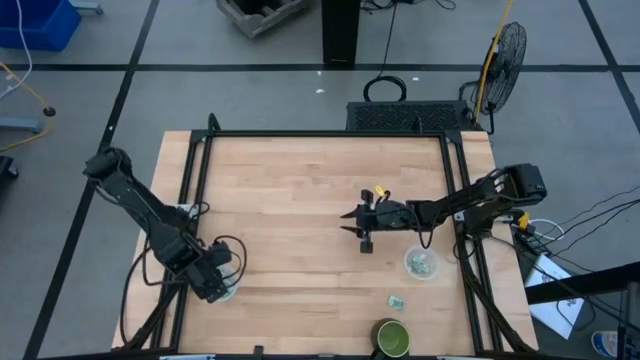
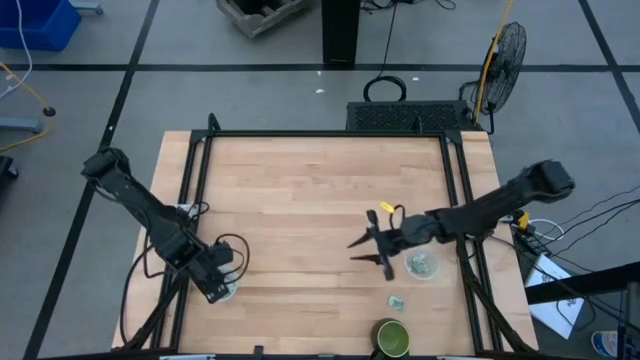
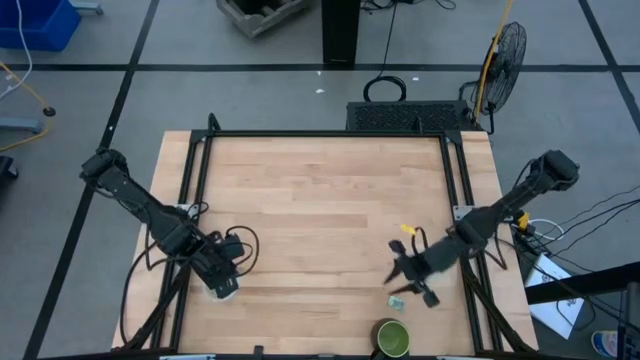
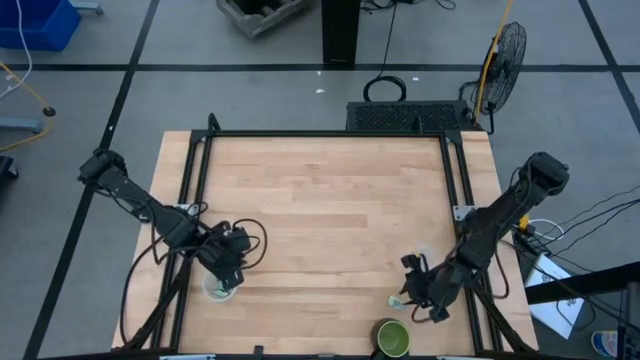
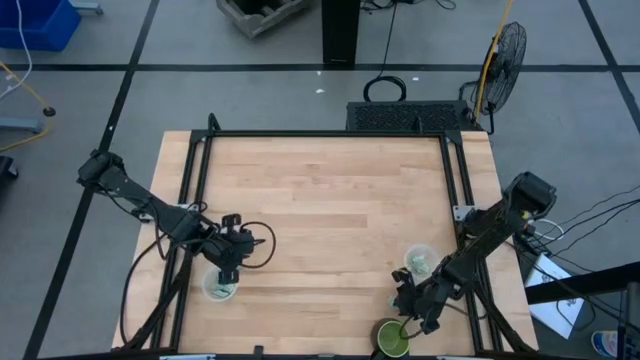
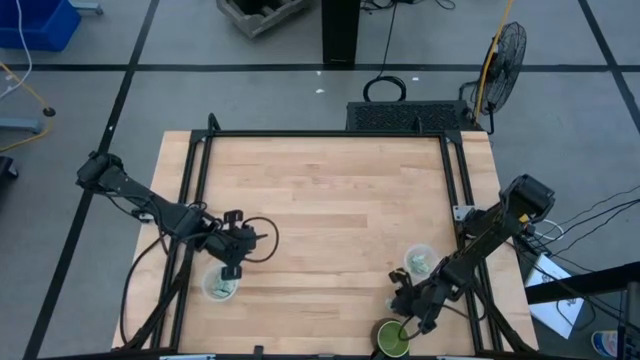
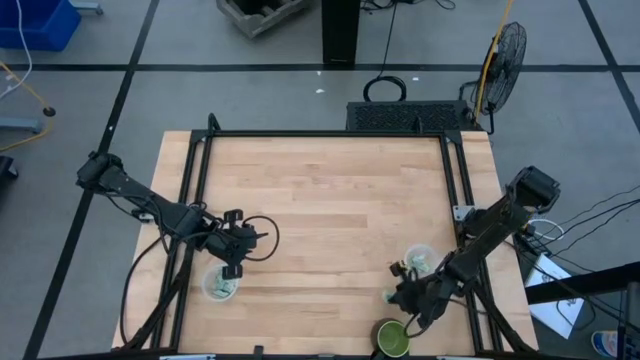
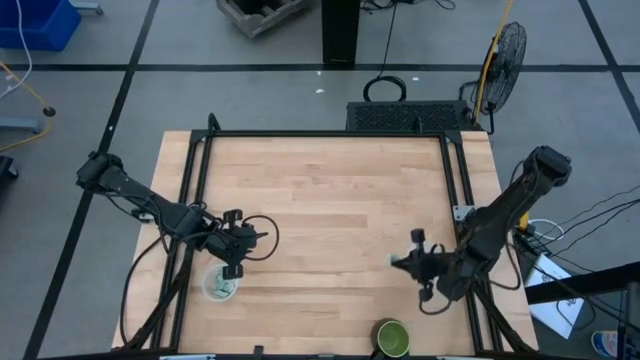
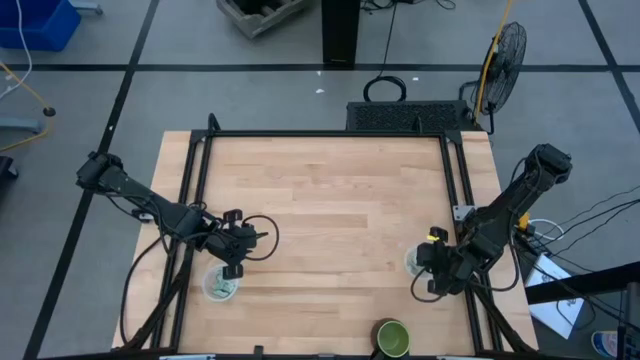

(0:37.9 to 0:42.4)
Task: Pick and place Stevia / Truvia into bins
Put the Stevia packet into the right transparent plastic container

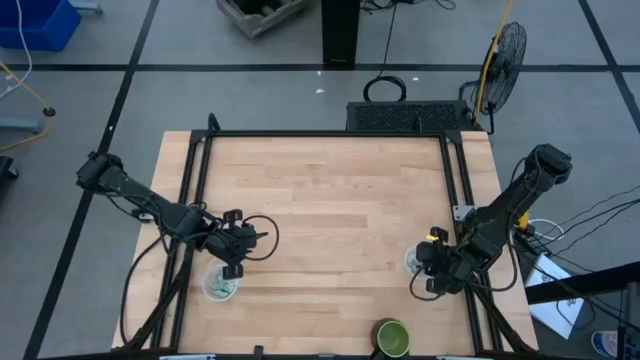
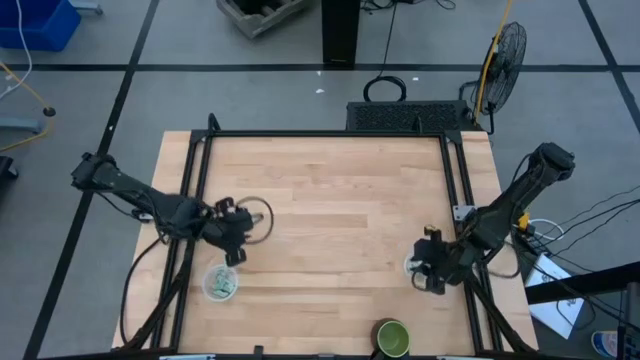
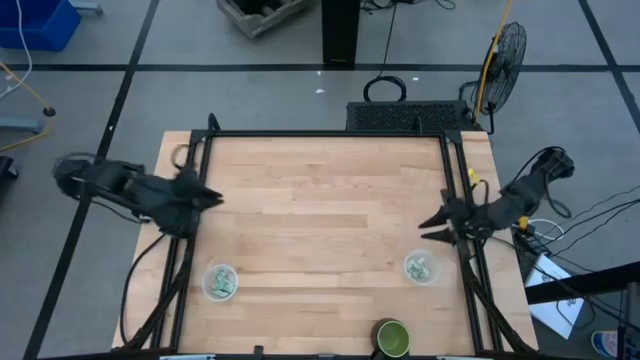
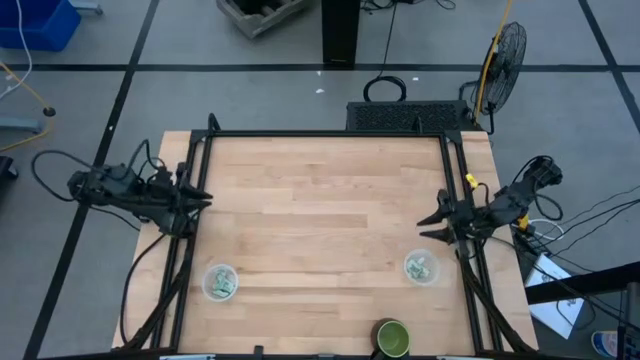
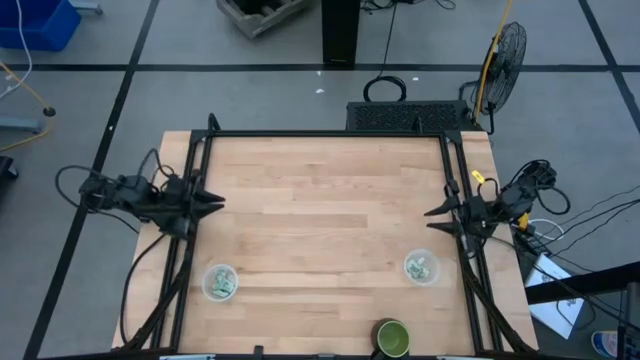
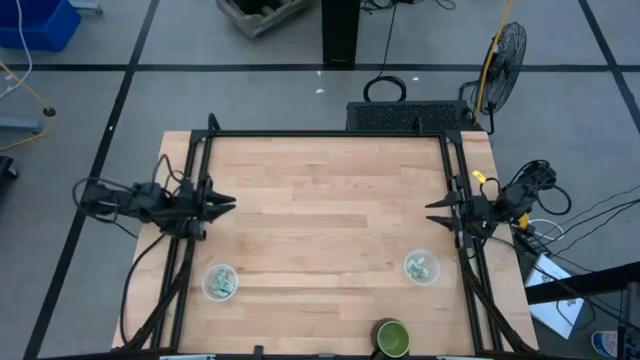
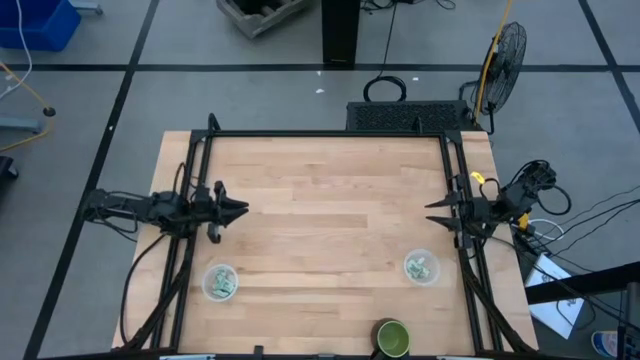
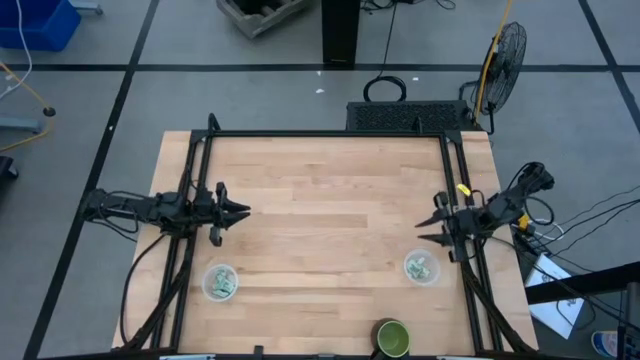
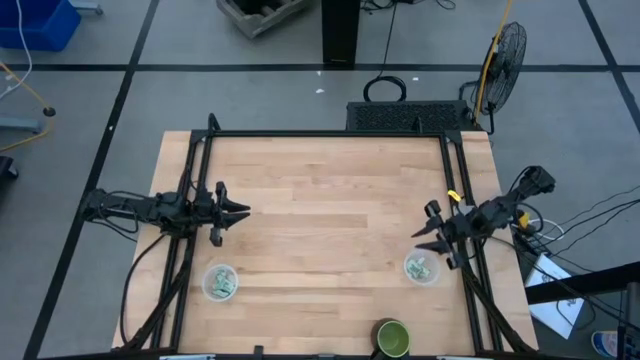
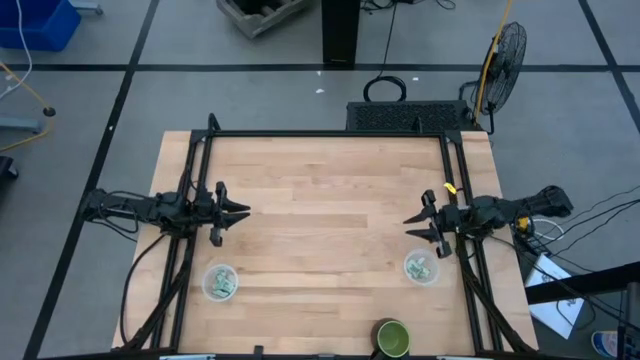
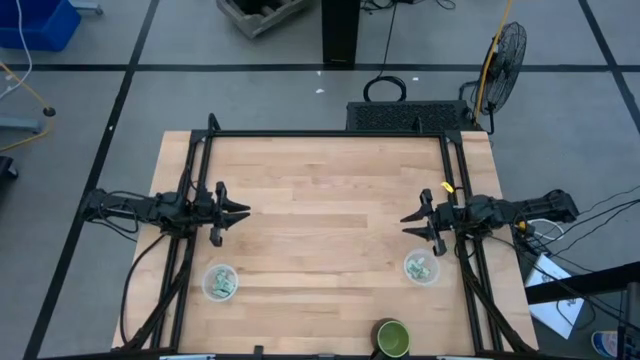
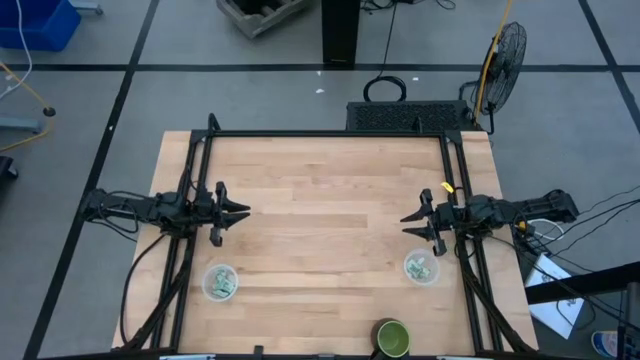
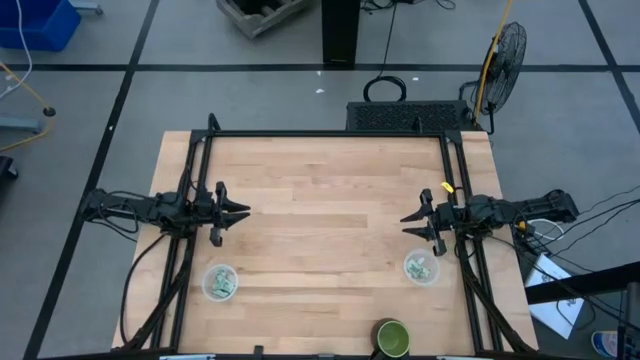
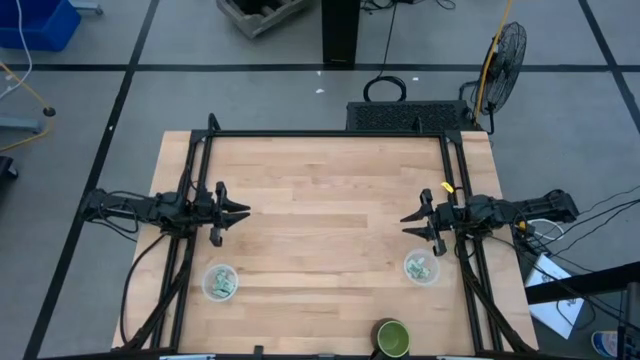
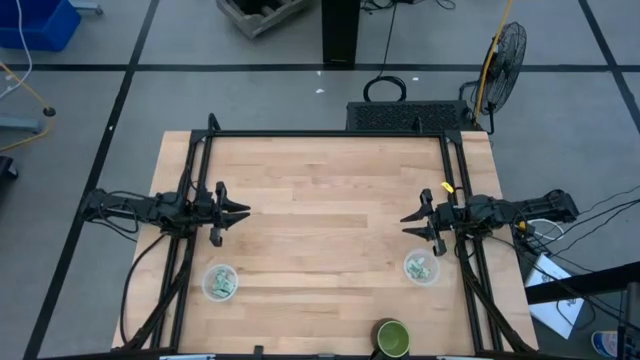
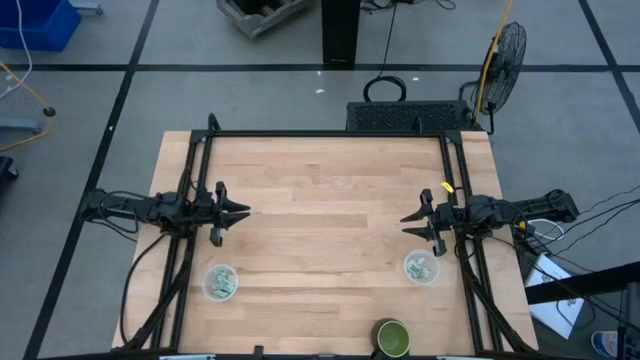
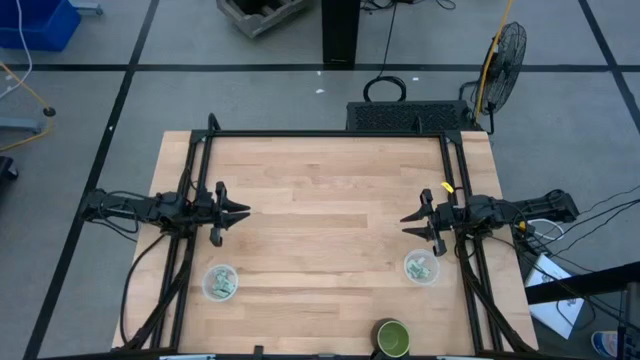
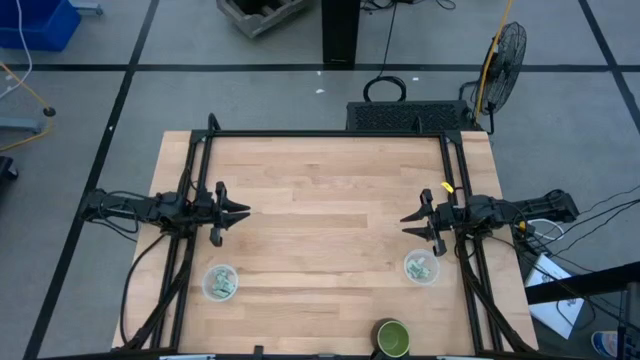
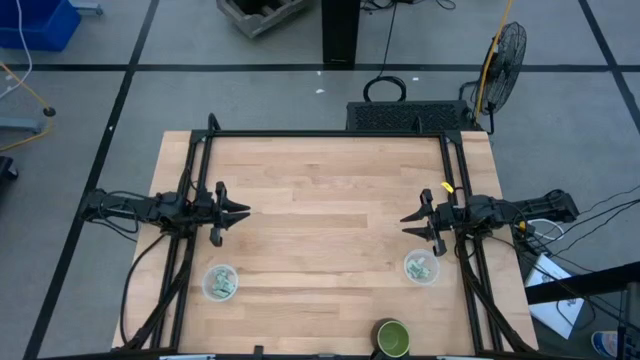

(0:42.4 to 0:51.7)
Return to Home Position

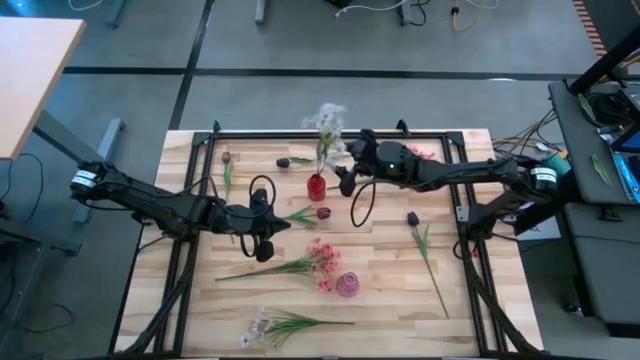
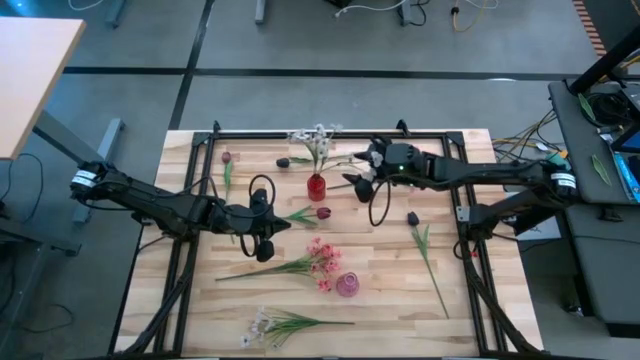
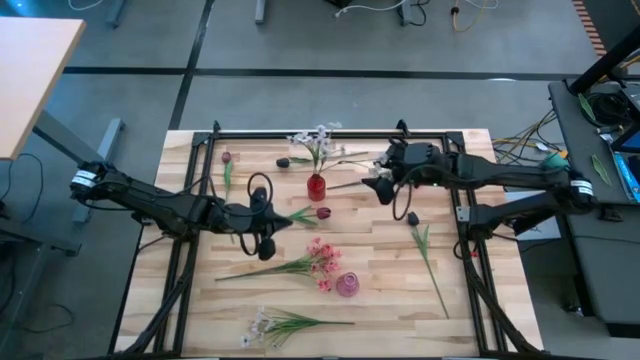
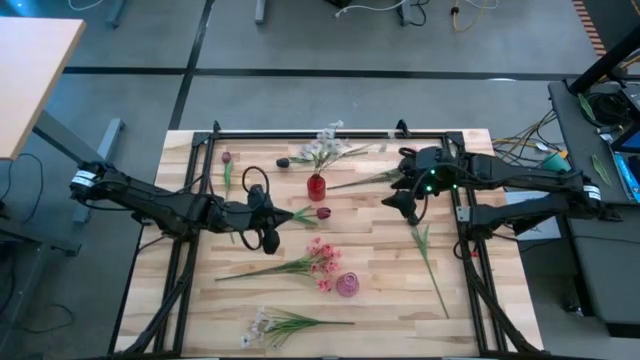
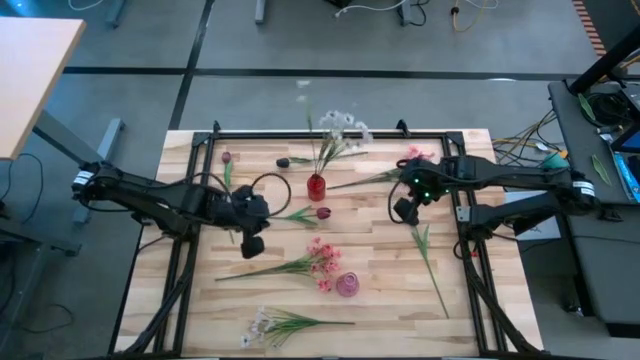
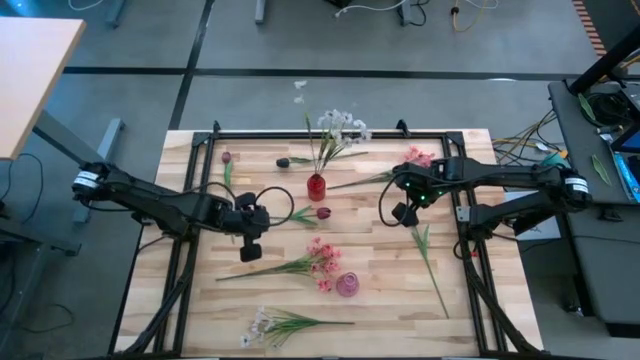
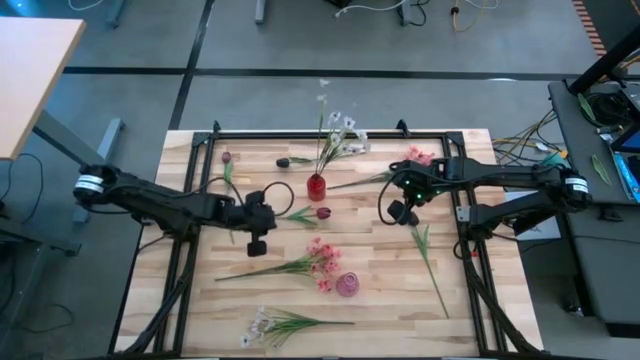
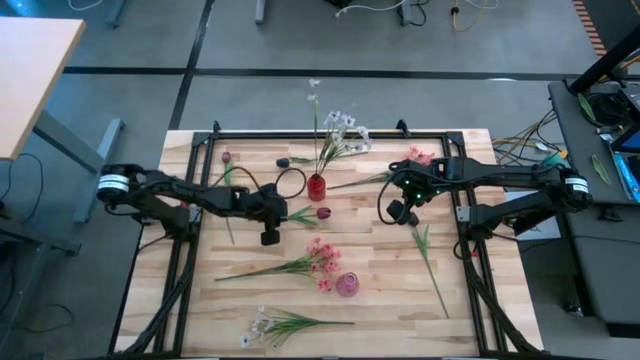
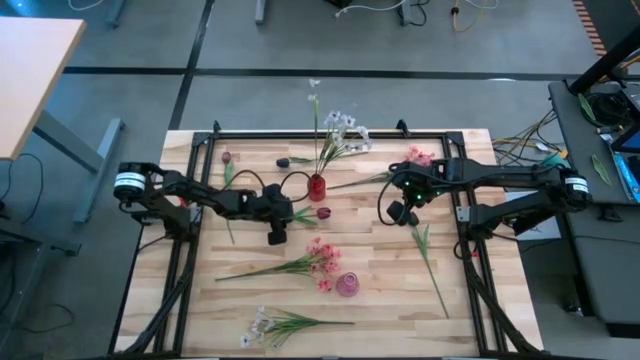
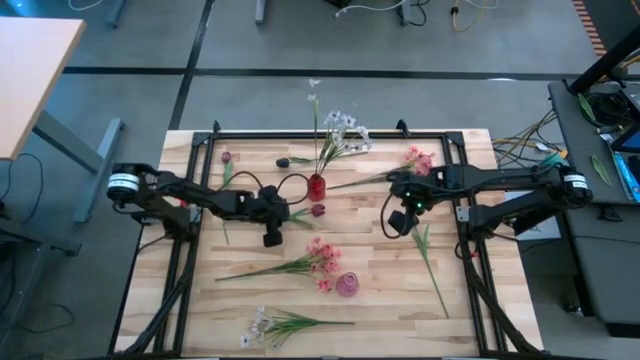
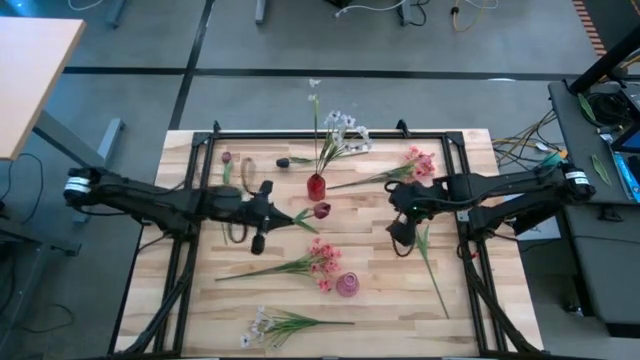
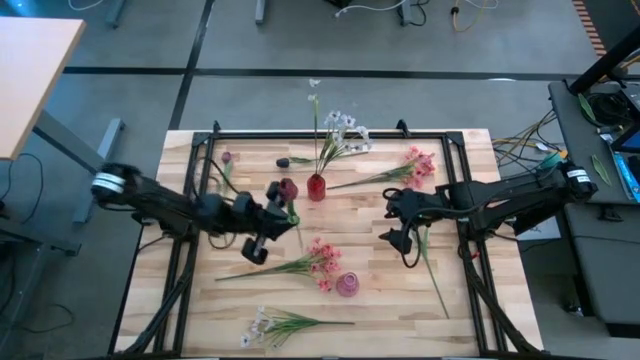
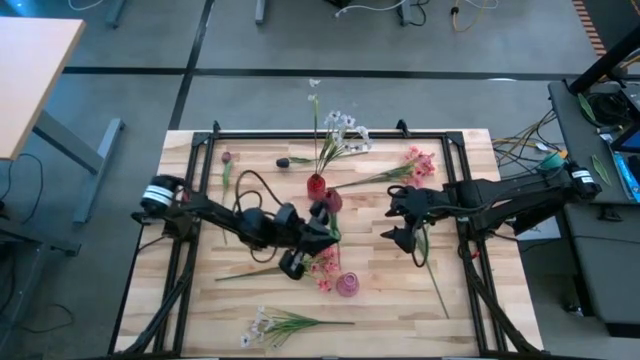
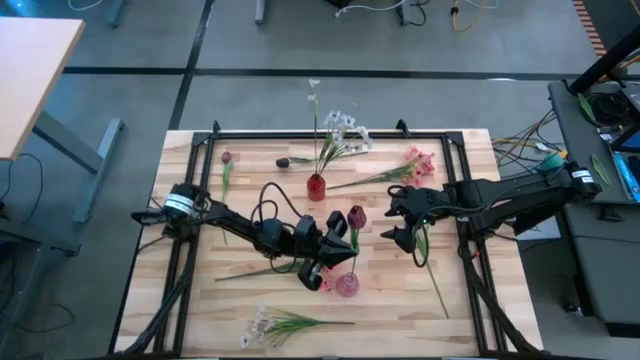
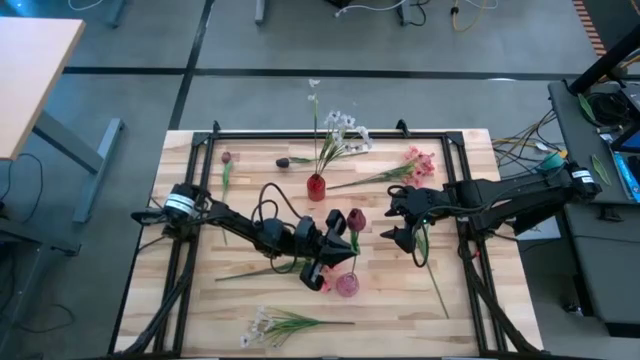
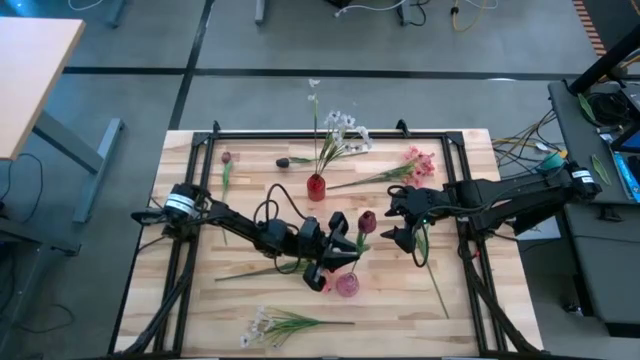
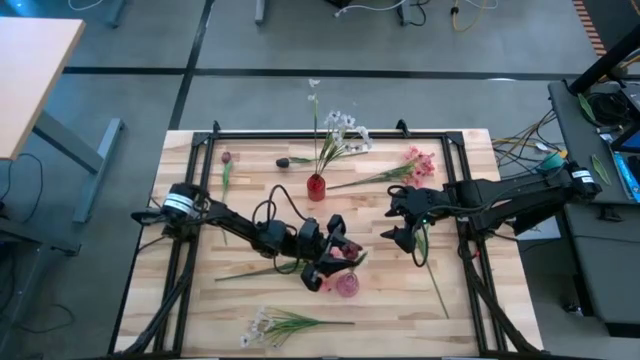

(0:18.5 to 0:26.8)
Task: Sort flowers into vase by color
Put the purple flower into the purple vase
